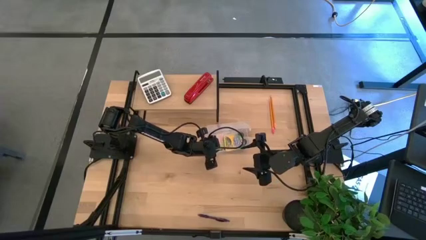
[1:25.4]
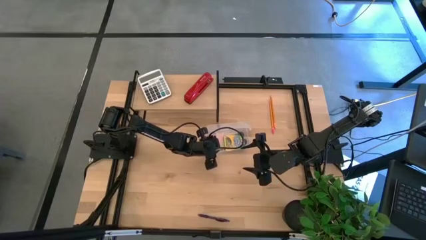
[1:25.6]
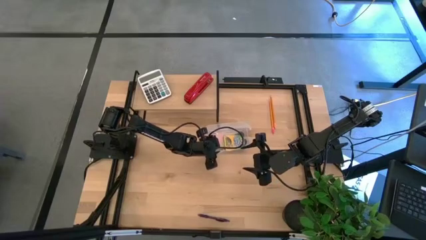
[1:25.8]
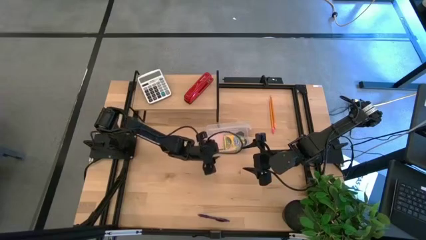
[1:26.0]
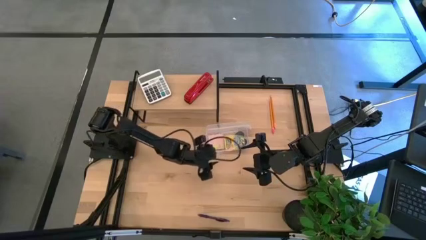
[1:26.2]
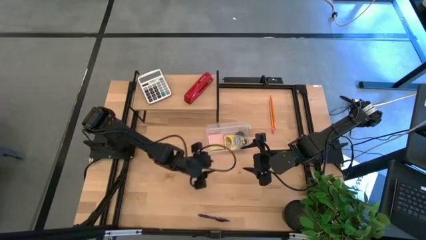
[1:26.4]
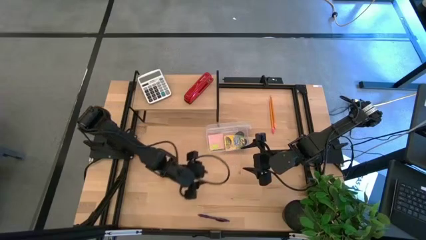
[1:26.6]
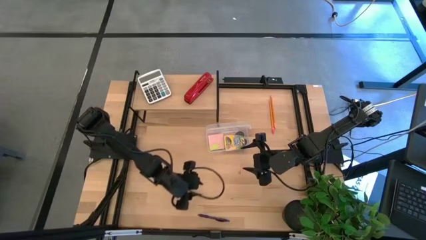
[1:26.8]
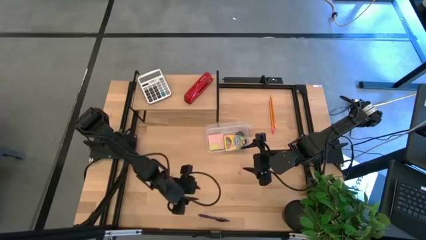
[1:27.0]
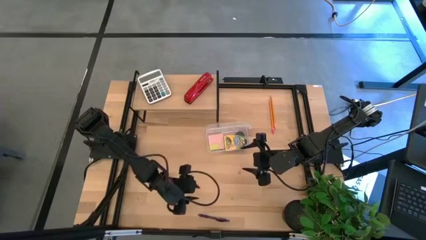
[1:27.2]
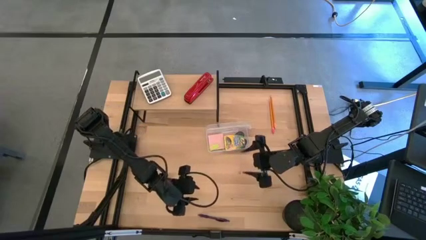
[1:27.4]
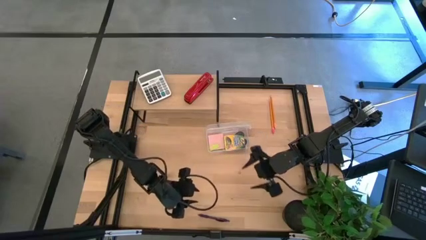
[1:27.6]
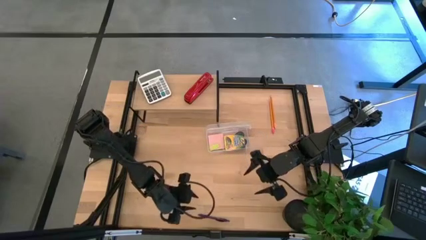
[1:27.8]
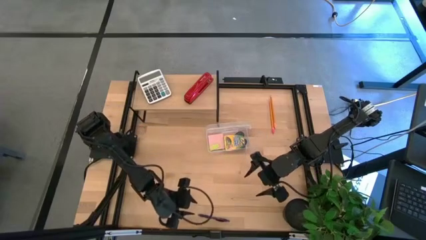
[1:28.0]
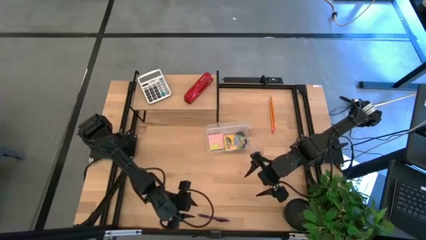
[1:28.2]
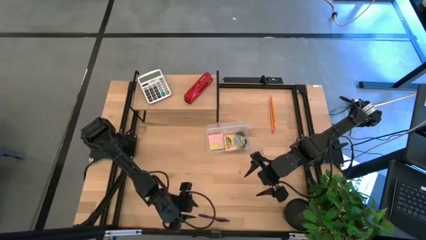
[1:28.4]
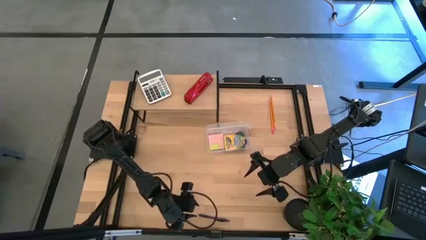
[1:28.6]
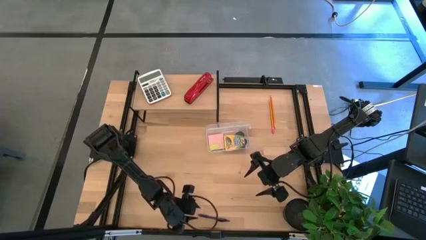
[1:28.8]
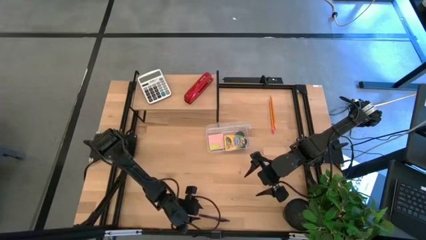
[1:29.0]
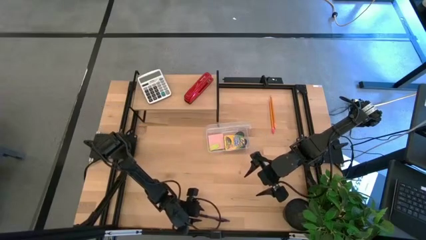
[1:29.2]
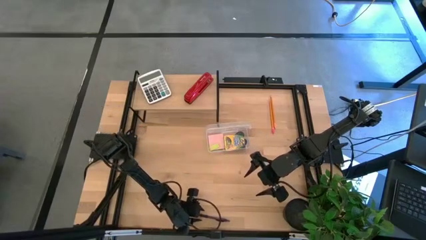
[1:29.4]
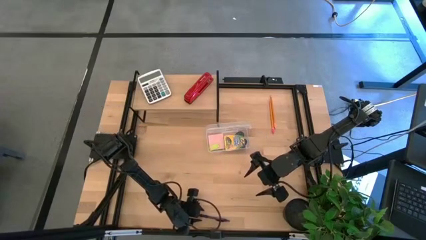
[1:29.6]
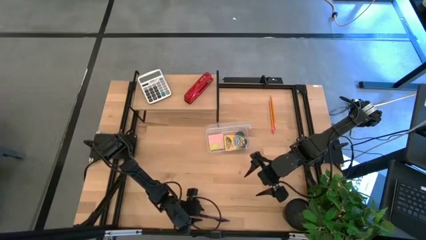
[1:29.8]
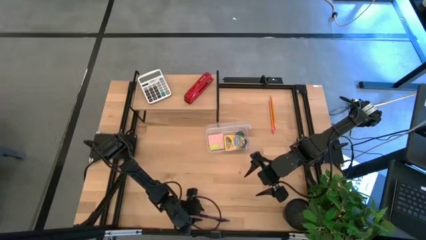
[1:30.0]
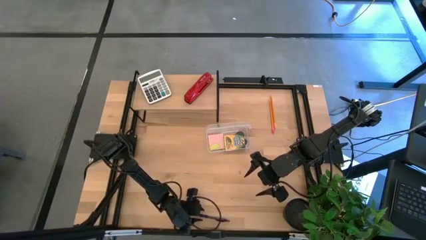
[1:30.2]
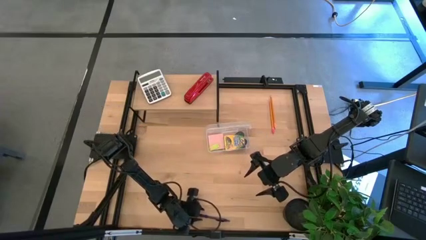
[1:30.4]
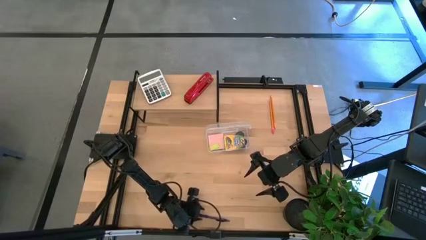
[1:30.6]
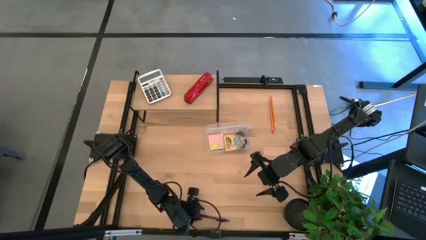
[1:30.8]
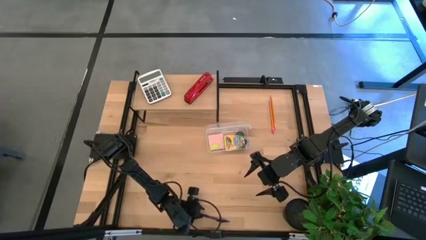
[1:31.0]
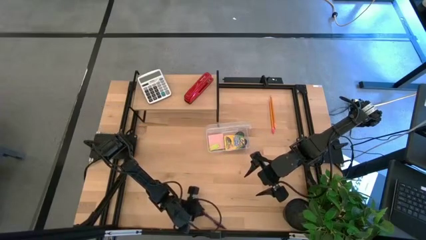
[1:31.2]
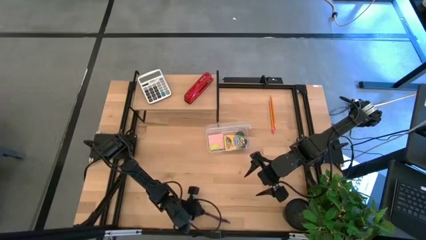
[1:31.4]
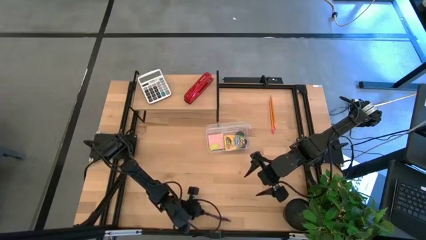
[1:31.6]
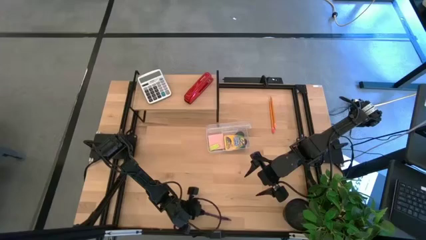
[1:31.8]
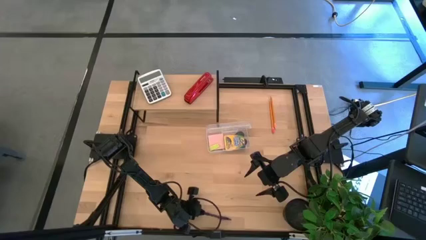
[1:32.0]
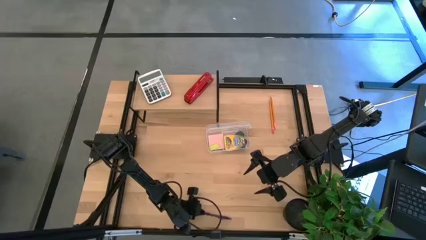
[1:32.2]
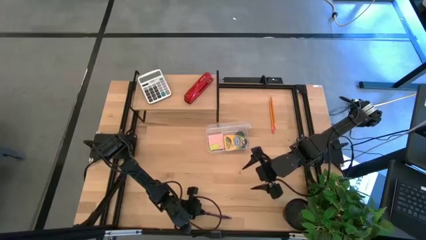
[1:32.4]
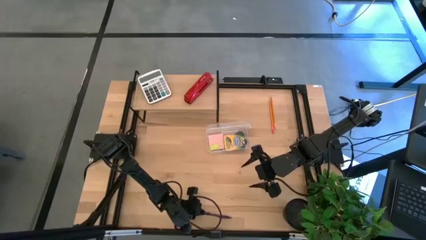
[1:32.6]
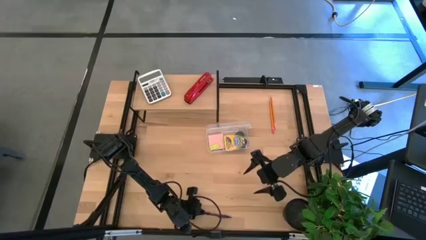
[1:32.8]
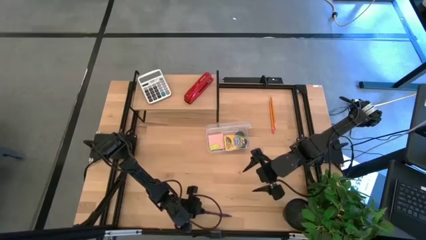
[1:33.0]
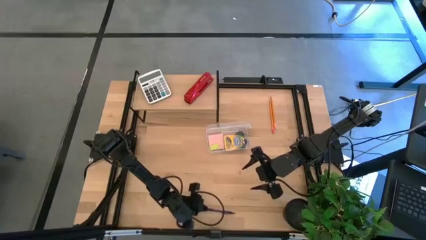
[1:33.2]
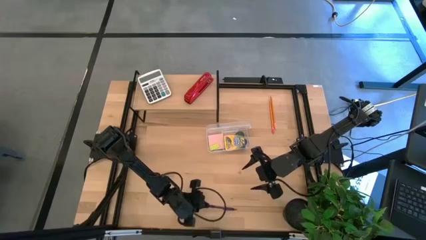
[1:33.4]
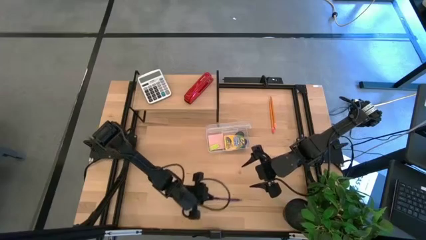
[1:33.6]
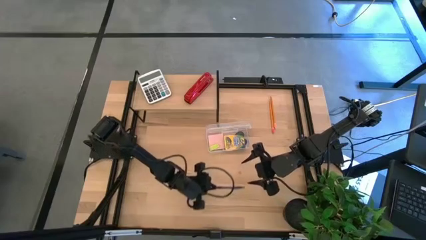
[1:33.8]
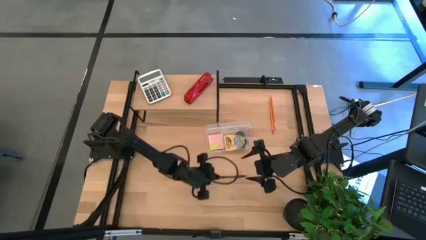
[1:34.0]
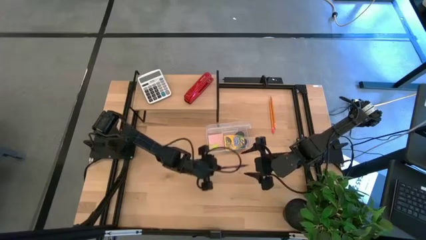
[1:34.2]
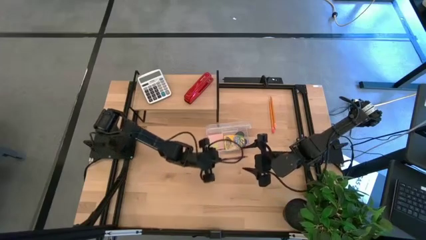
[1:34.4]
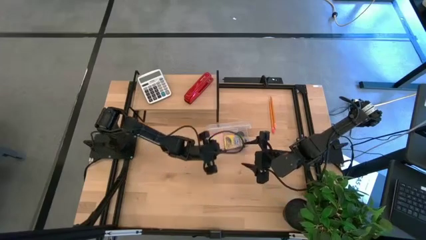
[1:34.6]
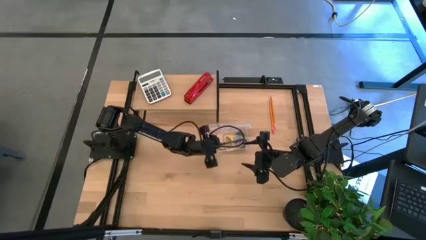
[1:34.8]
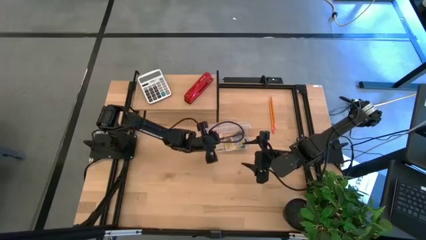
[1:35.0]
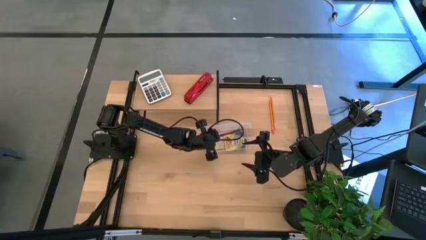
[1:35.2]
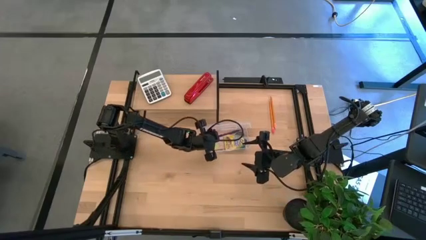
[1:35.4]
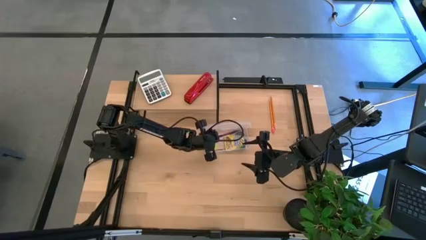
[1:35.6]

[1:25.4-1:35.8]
Task: Pack school essentials
Put the violet pen into the supply box

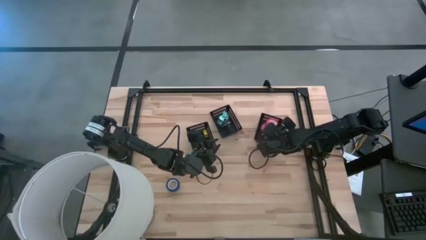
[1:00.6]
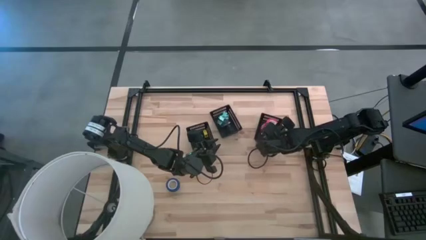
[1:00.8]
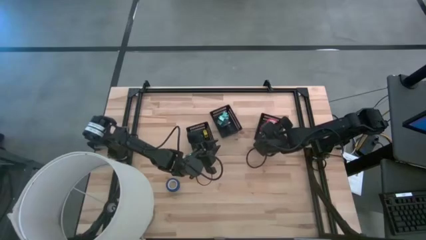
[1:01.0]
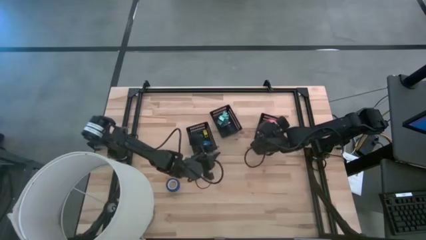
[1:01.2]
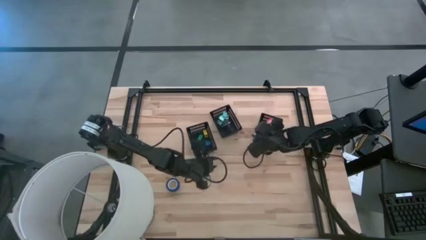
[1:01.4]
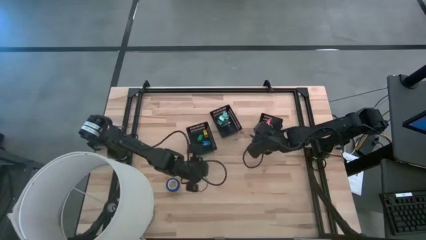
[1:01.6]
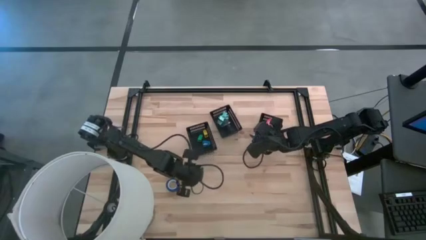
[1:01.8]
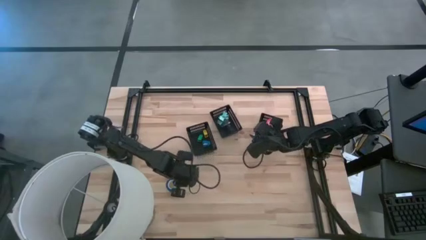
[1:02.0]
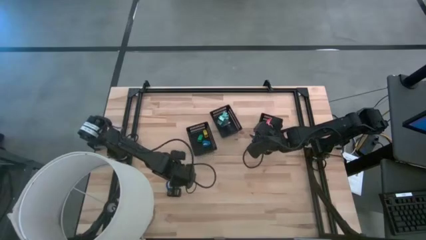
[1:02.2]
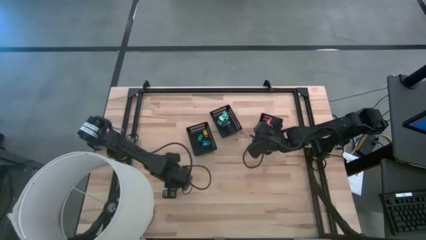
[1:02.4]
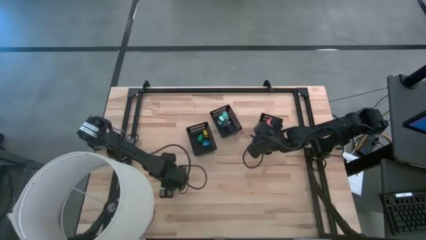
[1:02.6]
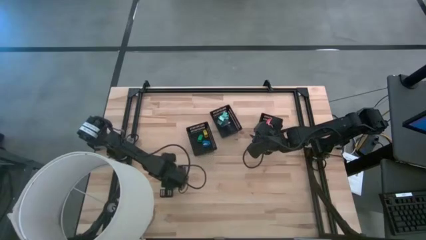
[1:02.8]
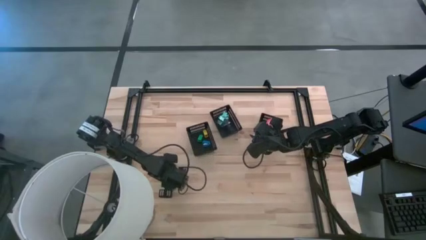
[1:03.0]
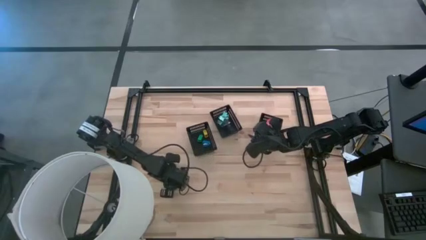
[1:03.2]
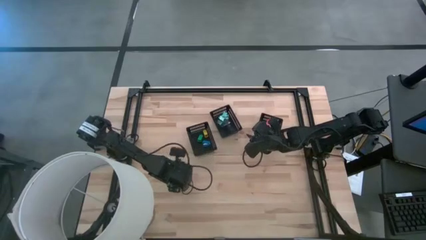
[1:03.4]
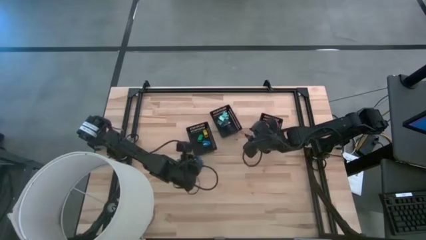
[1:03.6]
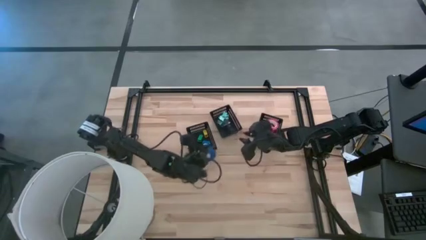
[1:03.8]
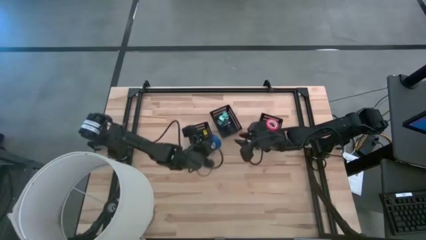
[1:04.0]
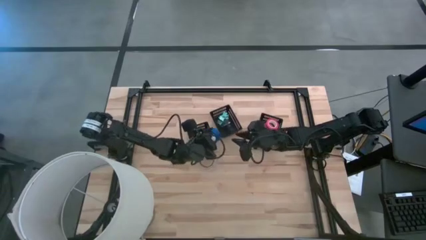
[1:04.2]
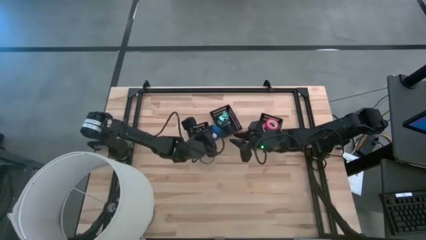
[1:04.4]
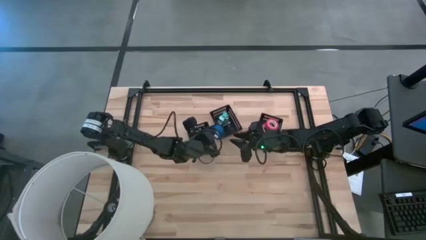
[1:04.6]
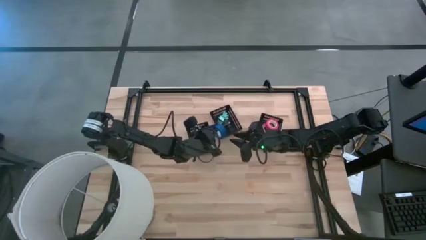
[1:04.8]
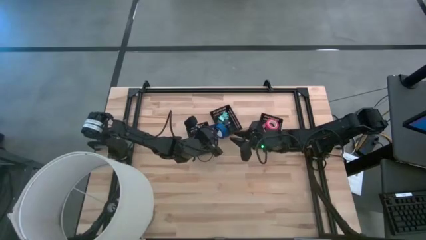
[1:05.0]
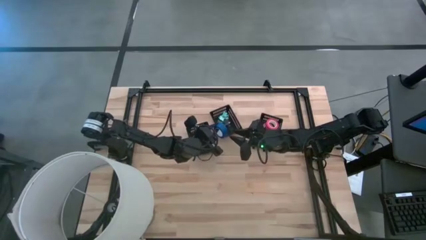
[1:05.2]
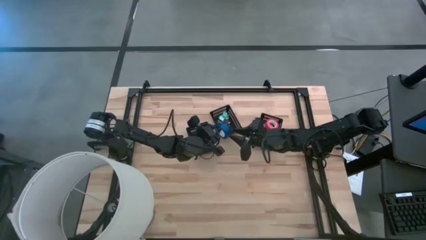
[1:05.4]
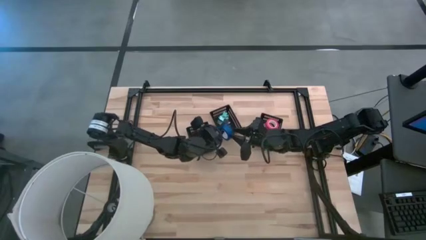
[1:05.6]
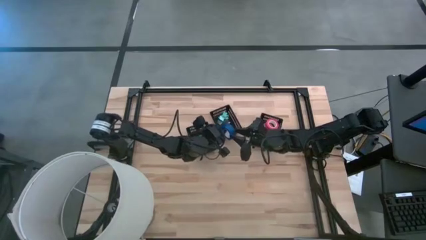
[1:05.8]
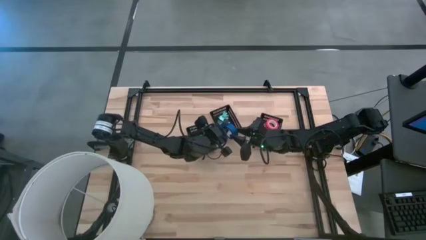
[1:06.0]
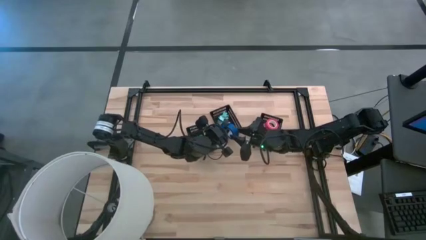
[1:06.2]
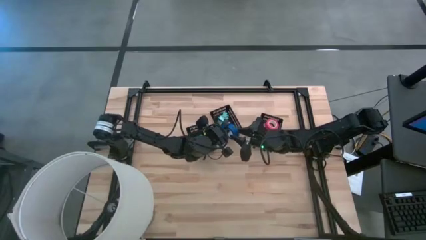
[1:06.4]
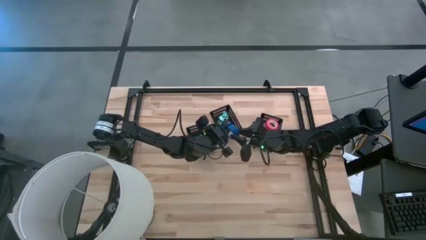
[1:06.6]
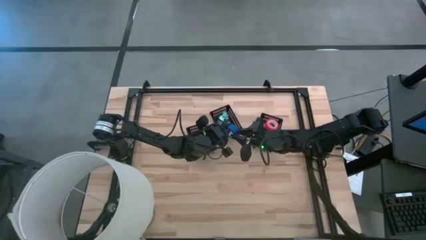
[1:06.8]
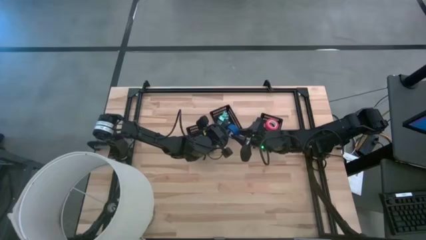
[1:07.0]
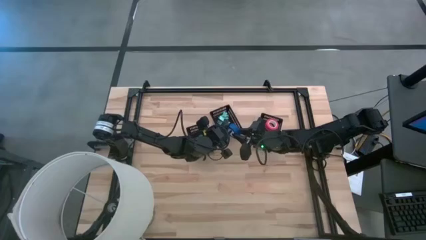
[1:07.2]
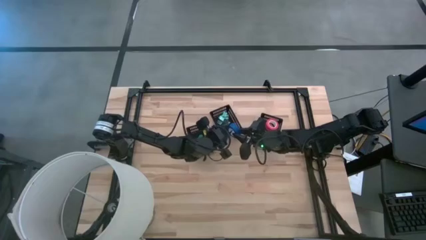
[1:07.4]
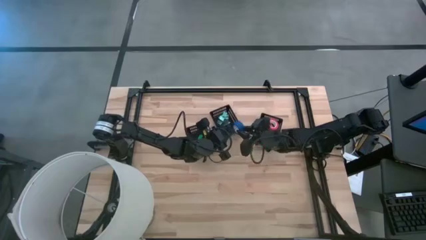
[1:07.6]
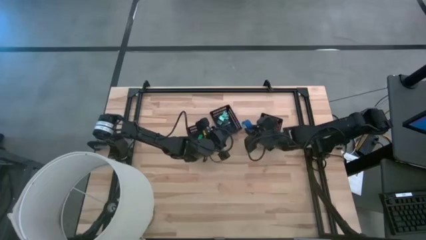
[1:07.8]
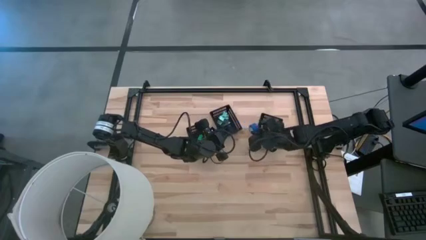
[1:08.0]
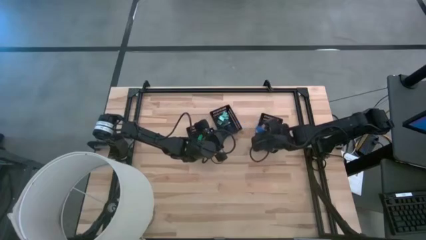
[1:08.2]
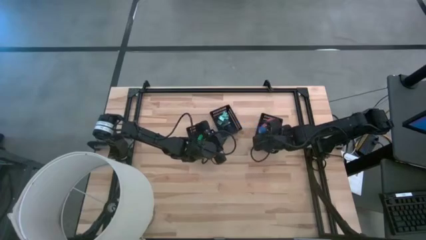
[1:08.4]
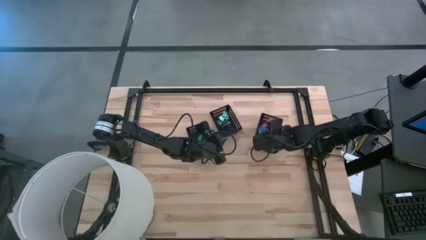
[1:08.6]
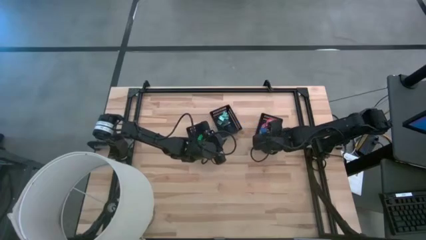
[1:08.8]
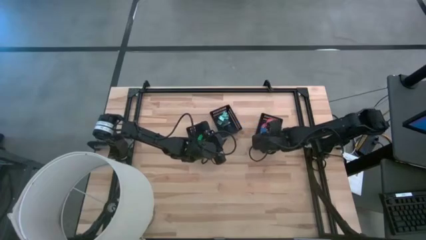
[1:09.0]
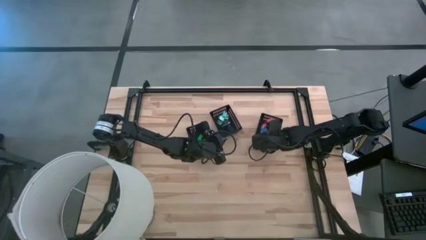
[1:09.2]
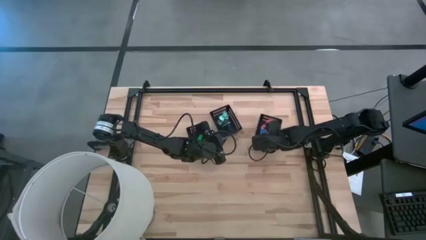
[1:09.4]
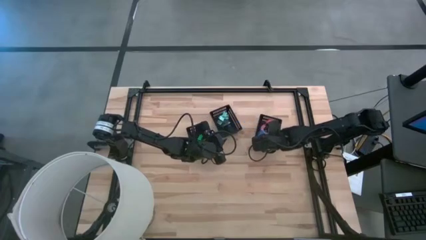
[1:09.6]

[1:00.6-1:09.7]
Task: Pick and place Stapler, Stapler remover, tape
Put the blue tape into the right black basket
